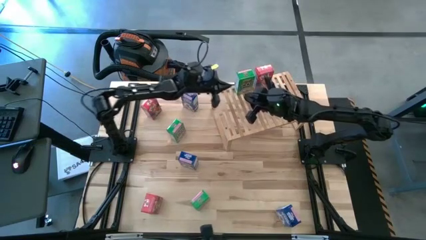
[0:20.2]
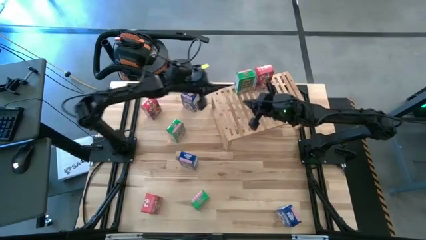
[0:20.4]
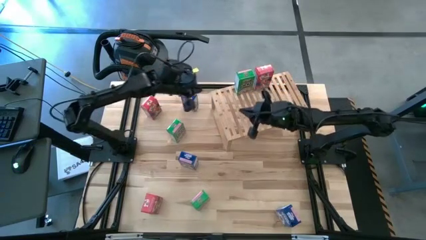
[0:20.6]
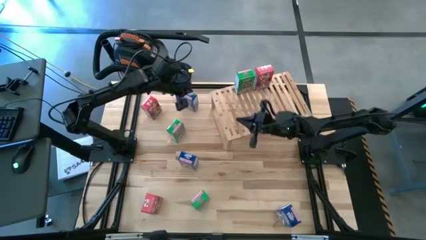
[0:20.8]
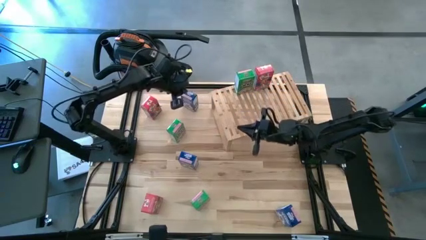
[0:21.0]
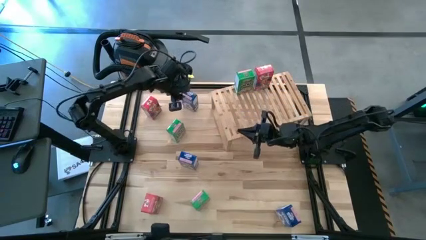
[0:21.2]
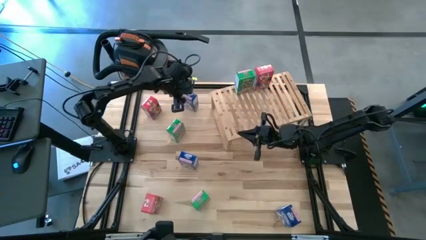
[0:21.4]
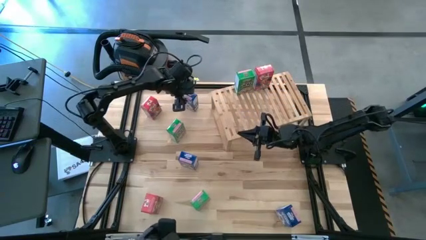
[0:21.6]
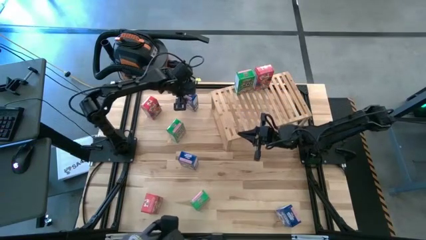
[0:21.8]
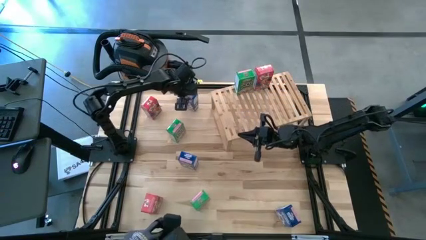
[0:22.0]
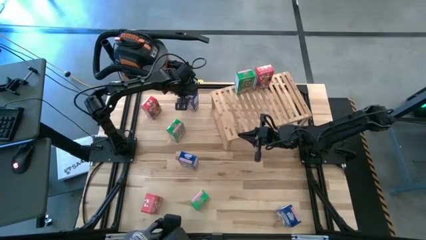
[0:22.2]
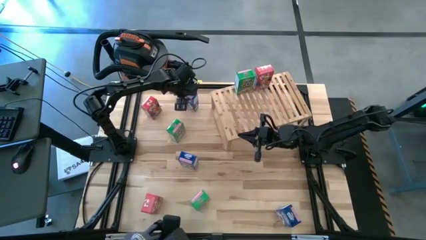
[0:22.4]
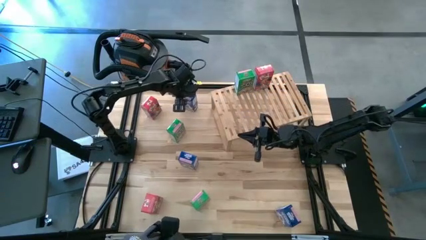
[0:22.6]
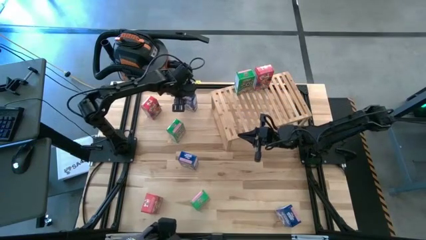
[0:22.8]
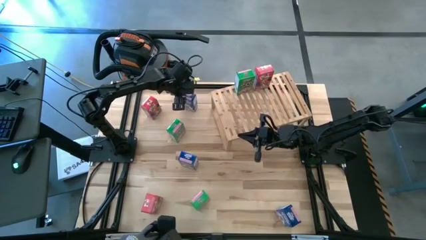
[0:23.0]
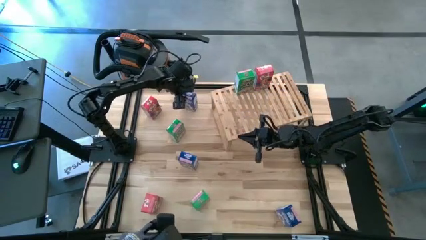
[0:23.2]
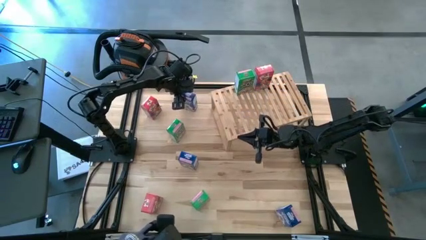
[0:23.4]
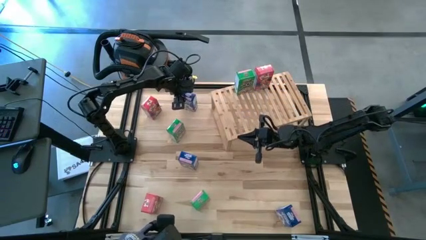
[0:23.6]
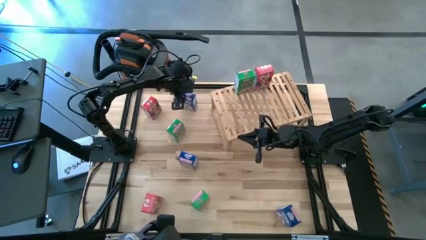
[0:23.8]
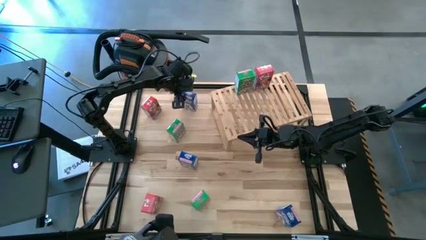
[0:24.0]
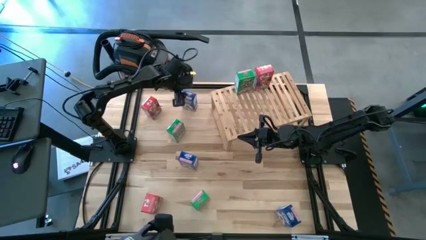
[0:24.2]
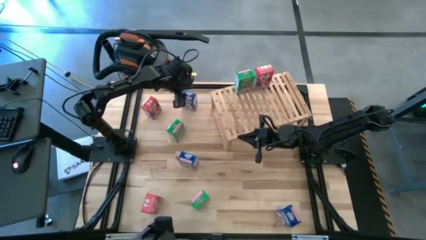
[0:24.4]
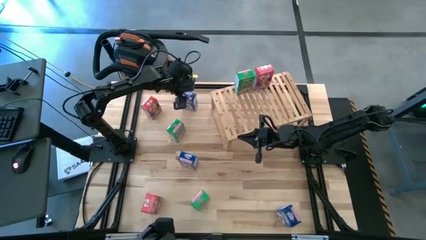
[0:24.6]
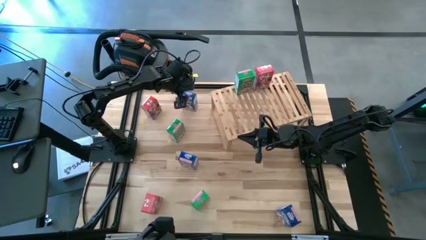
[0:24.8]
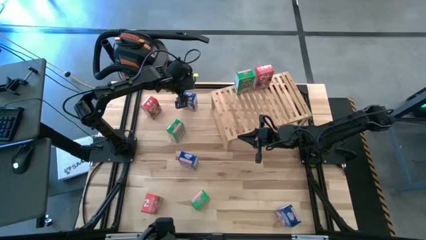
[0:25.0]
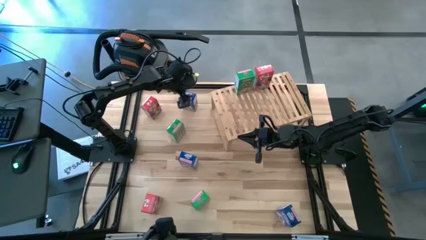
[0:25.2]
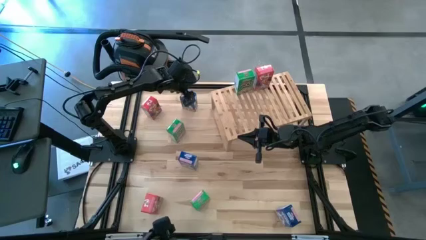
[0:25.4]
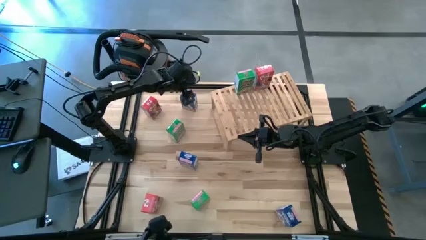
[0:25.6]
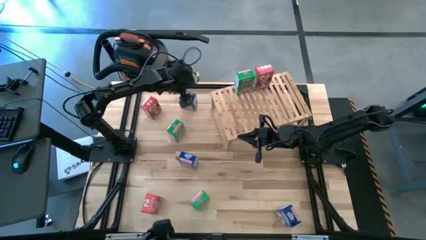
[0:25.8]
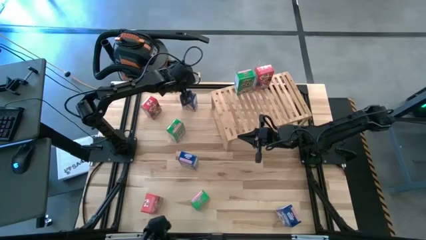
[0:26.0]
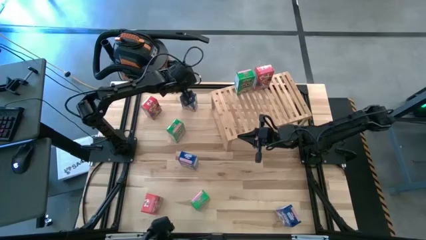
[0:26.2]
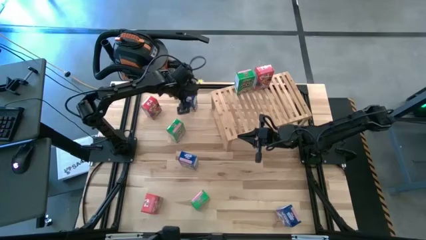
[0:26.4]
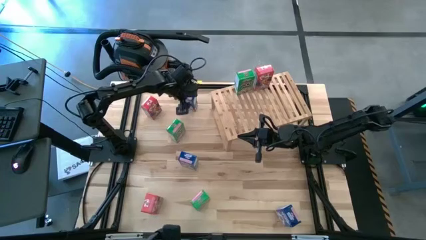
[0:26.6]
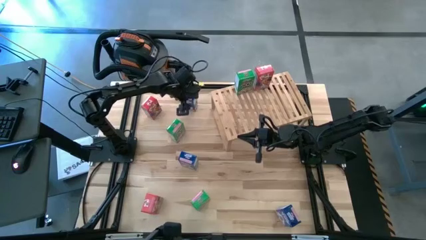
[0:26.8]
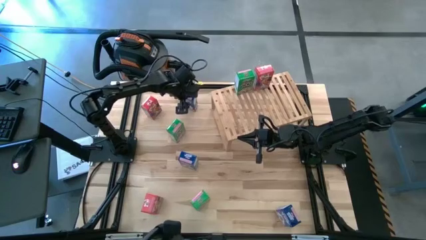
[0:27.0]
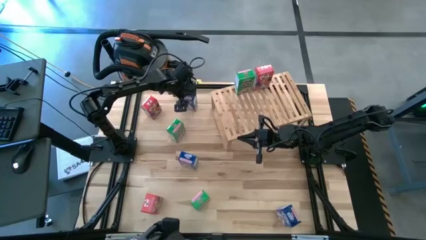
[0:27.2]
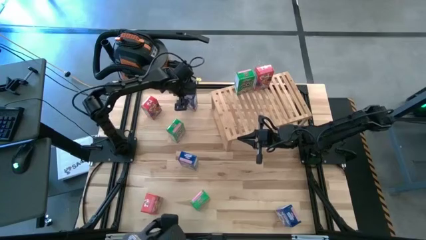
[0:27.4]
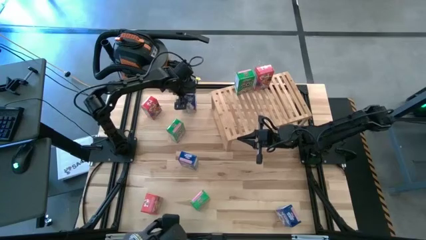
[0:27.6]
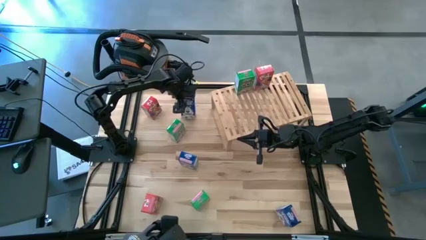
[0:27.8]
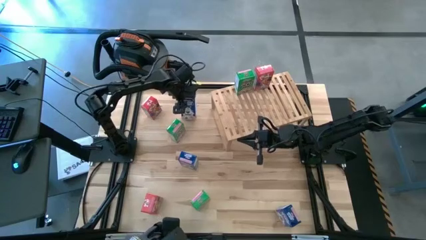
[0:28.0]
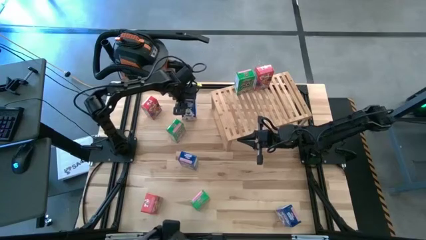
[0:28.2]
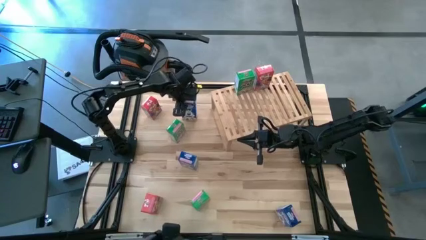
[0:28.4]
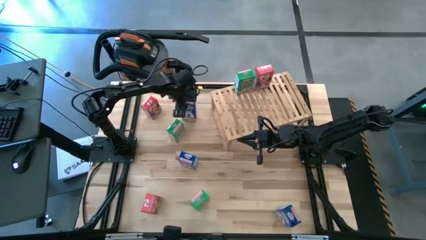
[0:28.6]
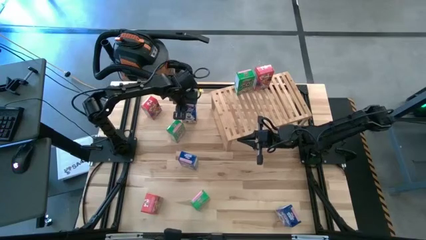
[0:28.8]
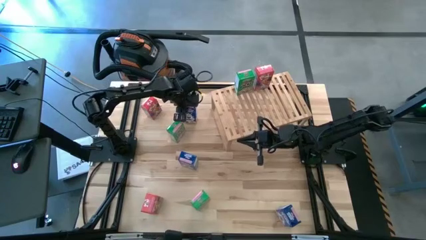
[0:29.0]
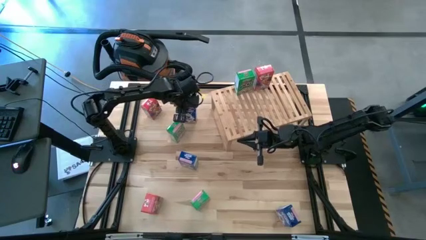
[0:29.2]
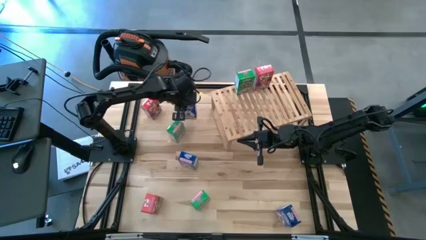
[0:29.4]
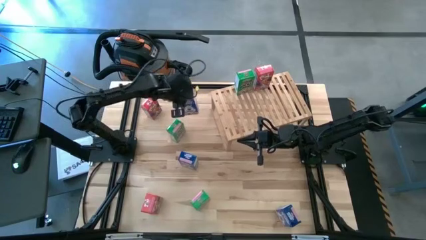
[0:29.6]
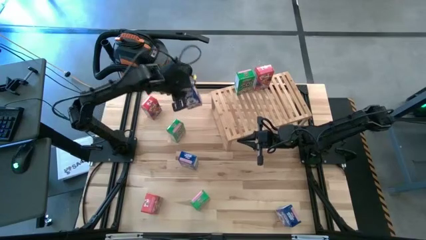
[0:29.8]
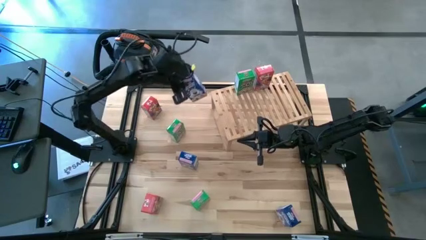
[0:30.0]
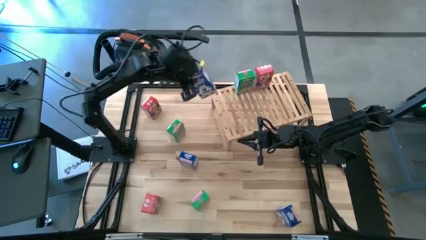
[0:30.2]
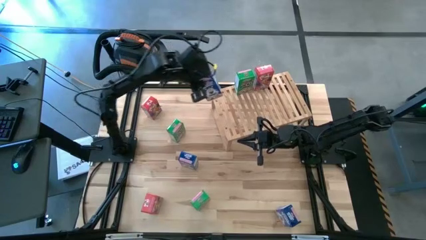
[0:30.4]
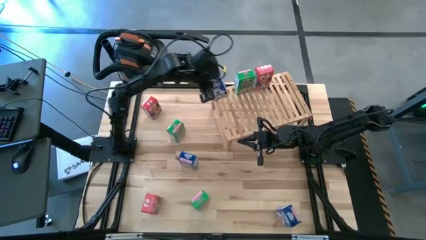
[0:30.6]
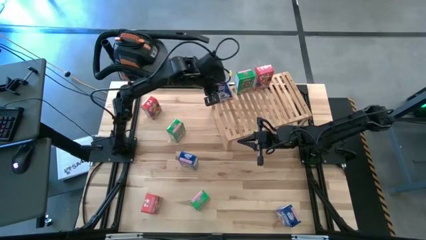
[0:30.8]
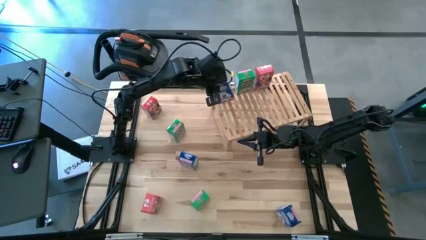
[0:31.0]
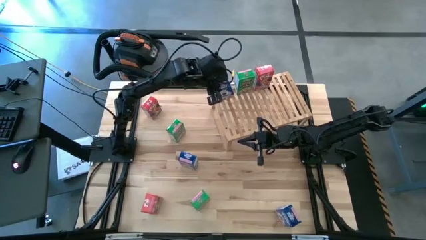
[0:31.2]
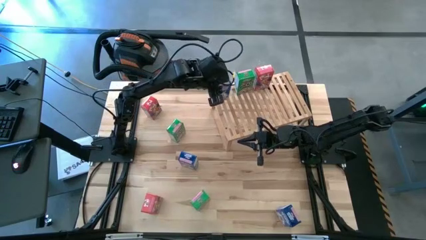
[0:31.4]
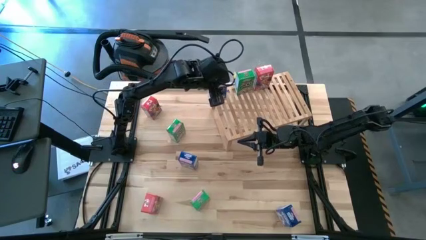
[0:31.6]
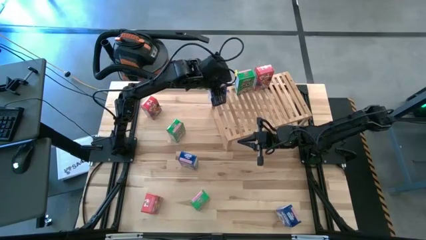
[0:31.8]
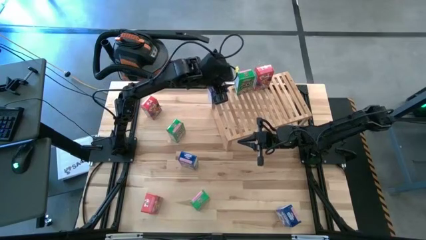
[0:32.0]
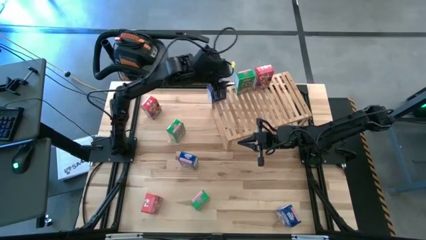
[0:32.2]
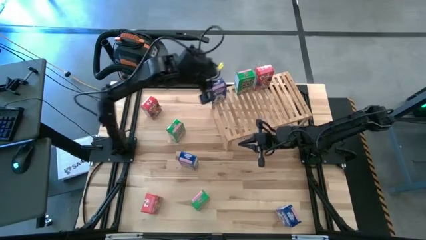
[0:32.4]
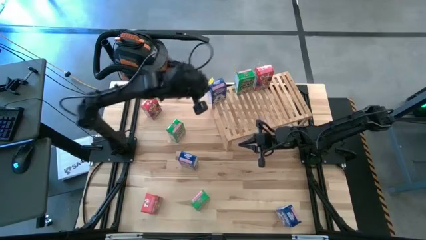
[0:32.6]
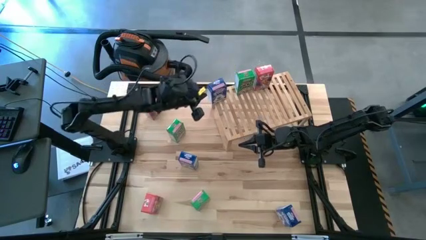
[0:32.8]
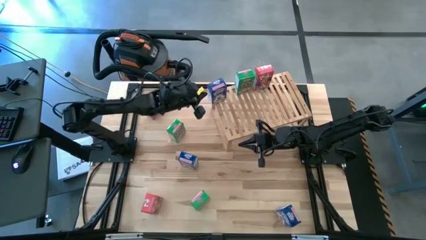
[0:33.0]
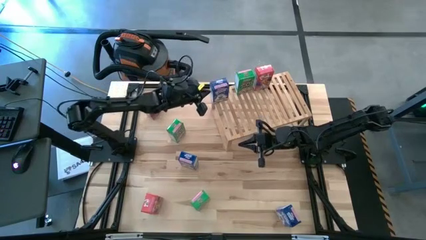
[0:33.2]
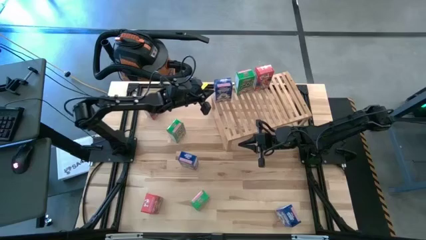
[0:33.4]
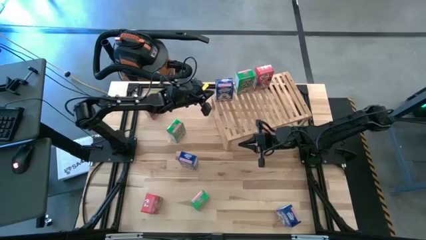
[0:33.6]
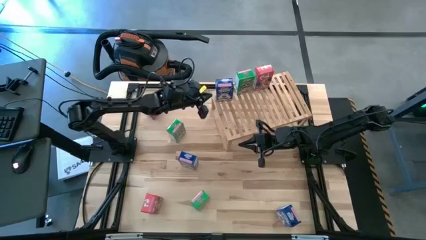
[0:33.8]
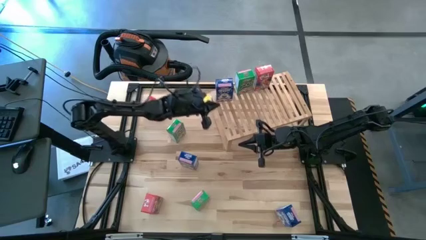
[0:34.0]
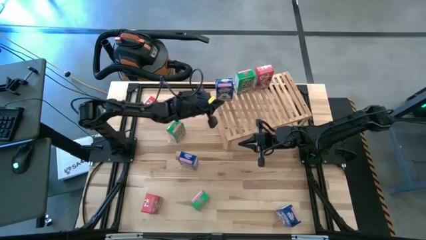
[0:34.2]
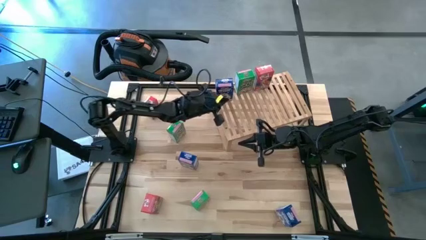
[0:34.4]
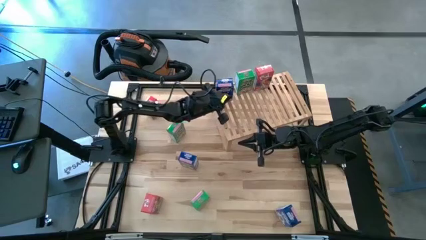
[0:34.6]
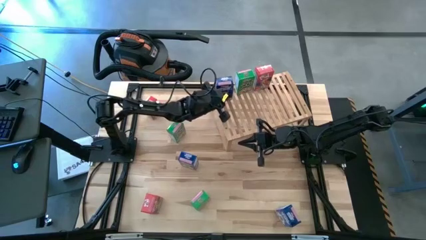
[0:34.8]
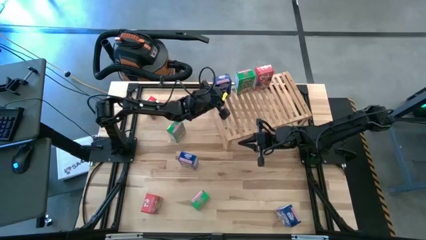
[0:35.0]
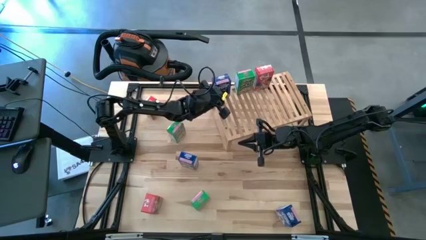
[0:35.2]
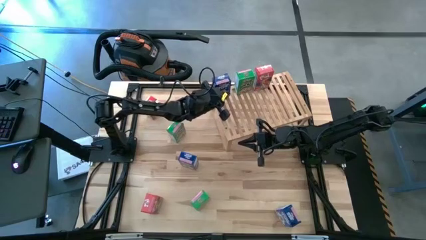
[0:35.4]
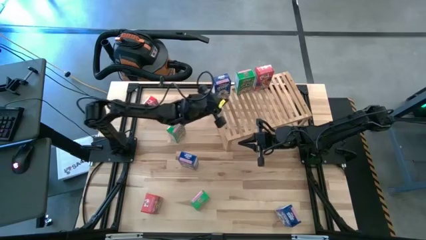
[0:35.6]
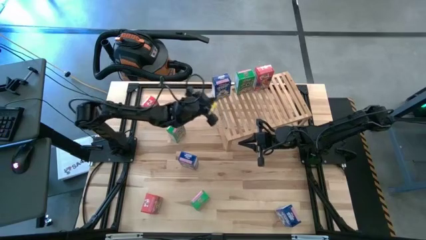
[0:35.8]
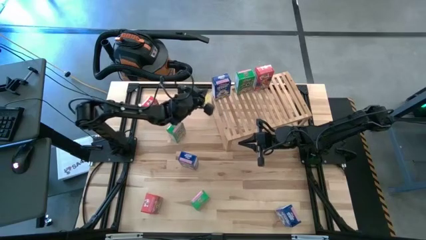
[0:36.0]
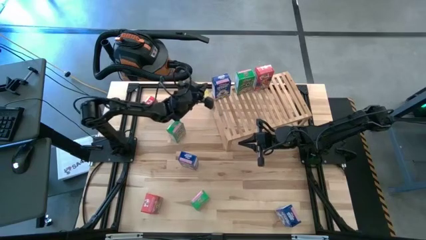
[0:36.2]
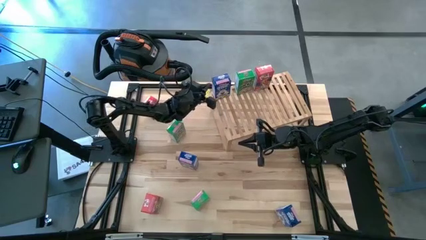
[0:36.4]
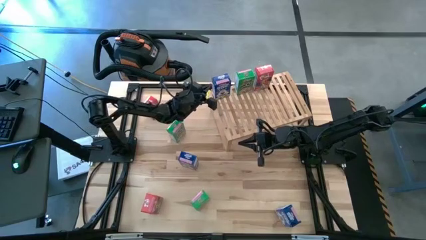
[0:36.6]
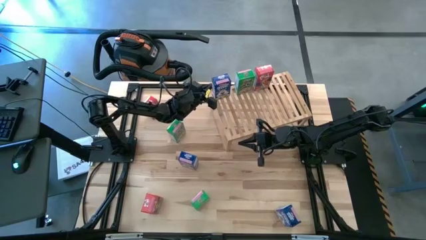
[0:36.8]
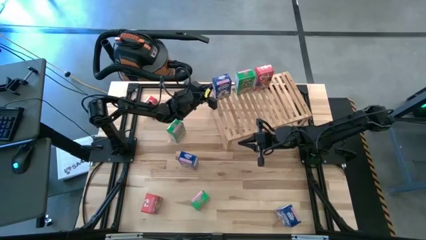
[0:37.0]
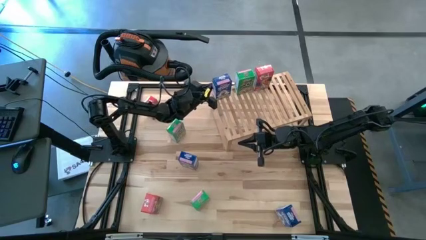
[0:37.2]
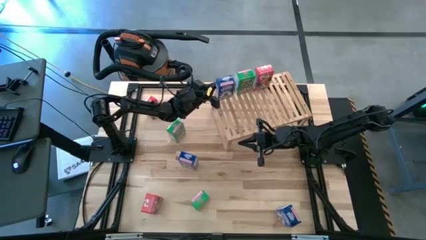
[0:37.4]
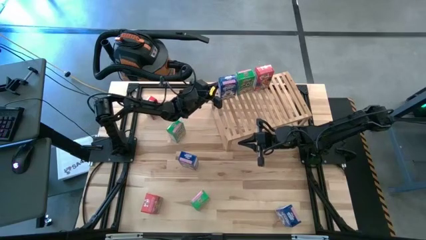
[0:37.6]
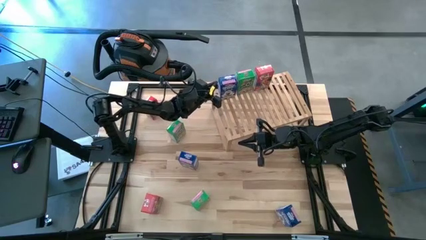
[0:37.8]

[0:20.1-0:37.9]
Task: Stack cereal on shelf
Put the top blue cereal box on the shelf
